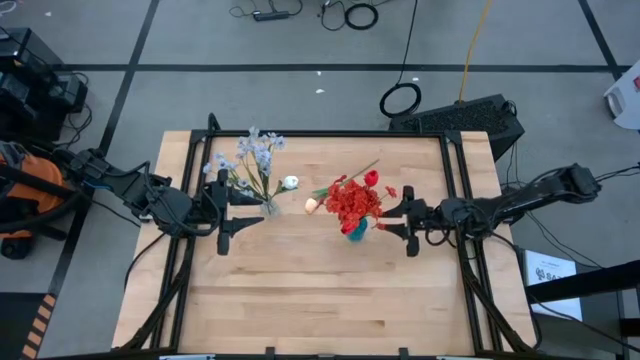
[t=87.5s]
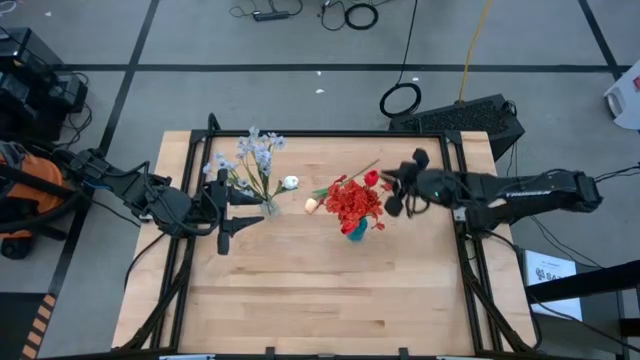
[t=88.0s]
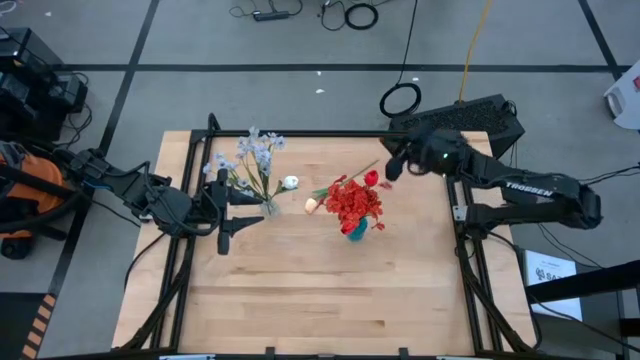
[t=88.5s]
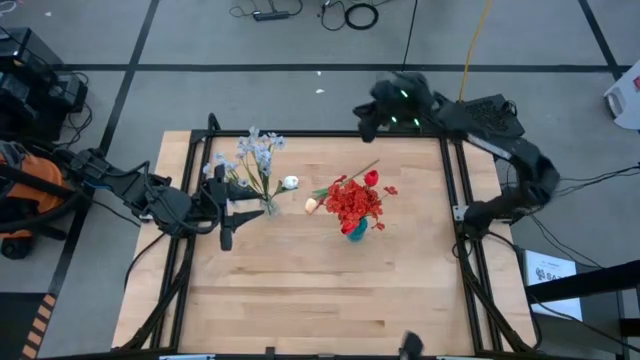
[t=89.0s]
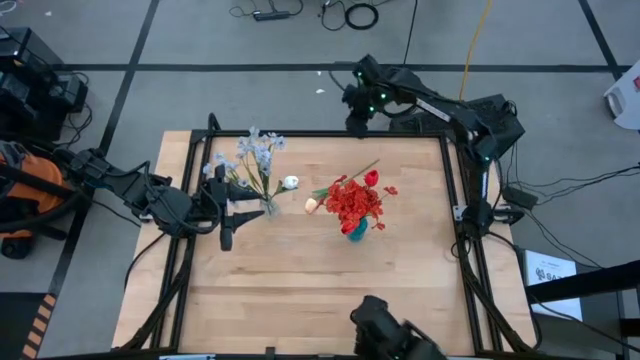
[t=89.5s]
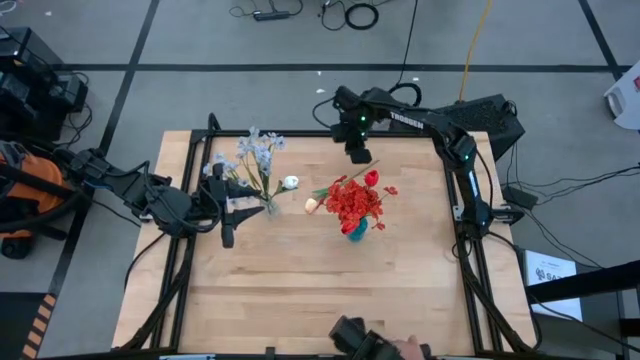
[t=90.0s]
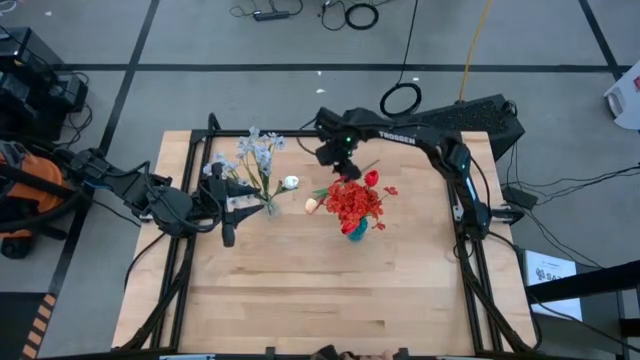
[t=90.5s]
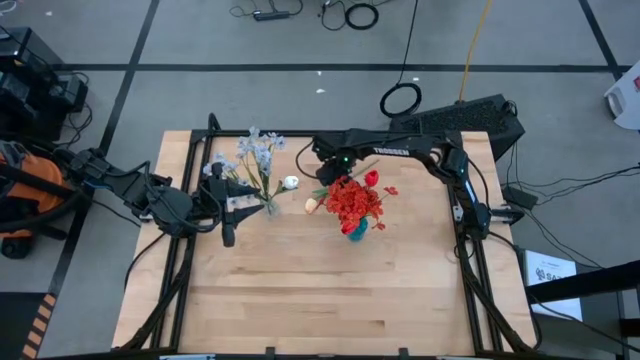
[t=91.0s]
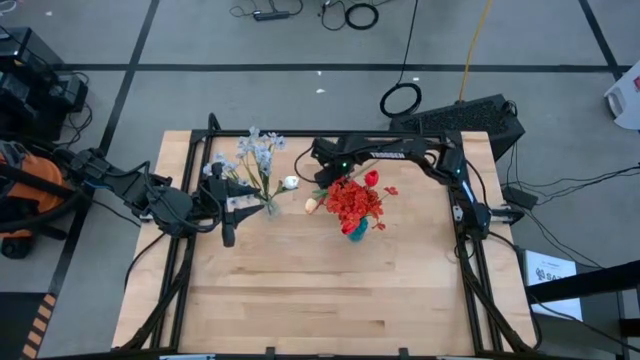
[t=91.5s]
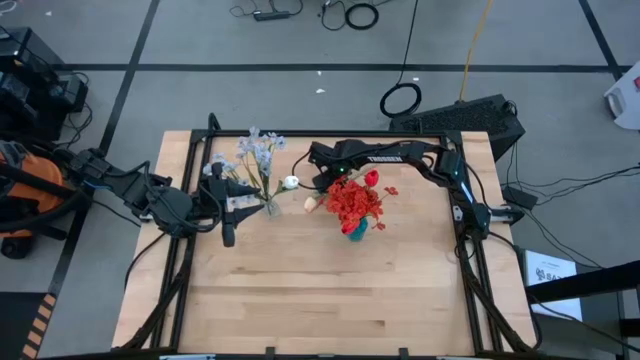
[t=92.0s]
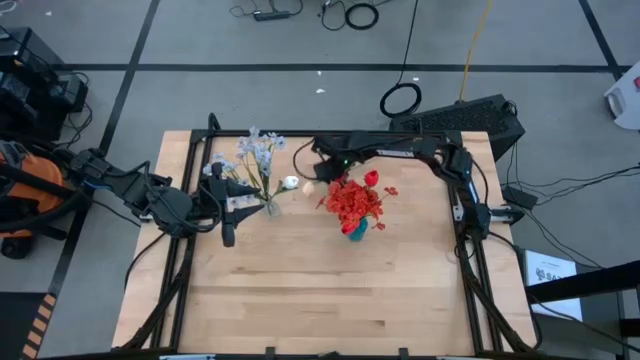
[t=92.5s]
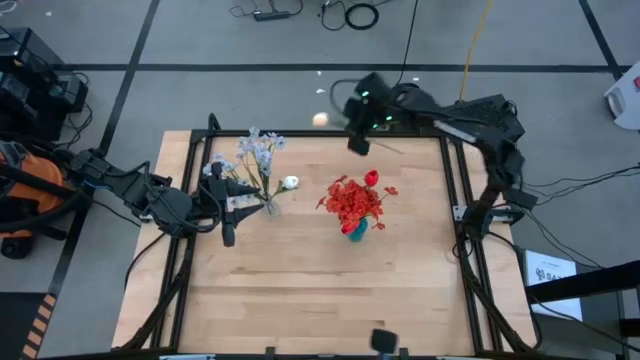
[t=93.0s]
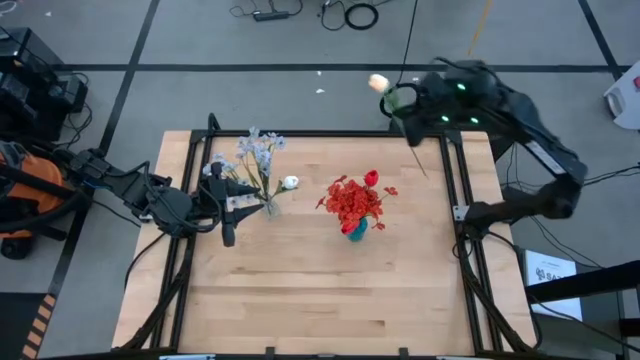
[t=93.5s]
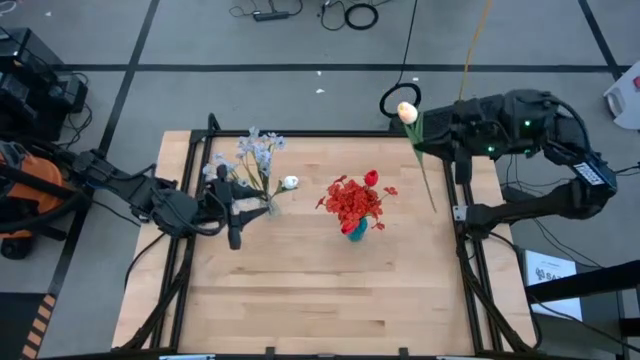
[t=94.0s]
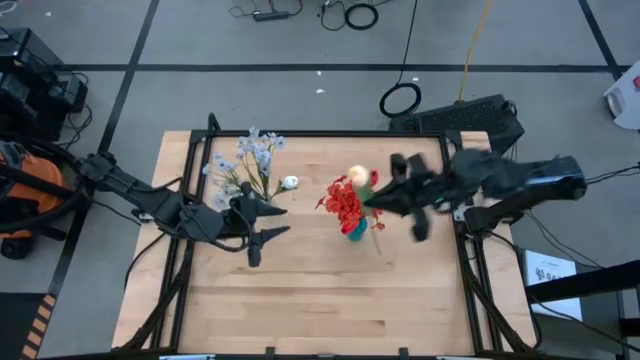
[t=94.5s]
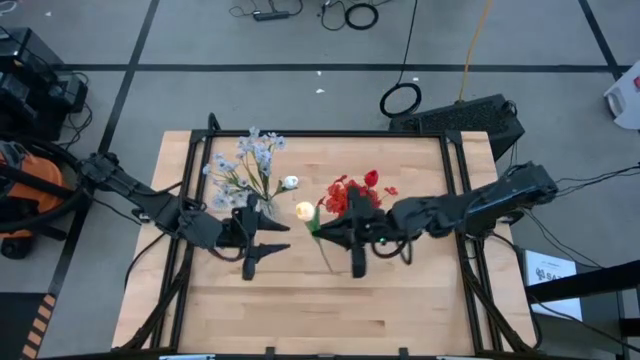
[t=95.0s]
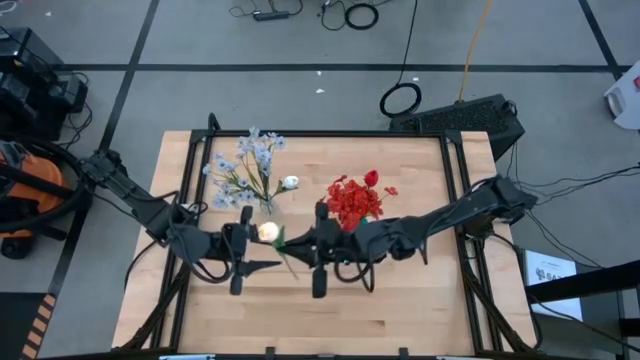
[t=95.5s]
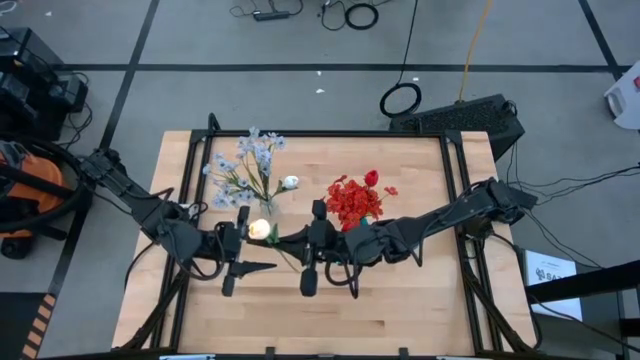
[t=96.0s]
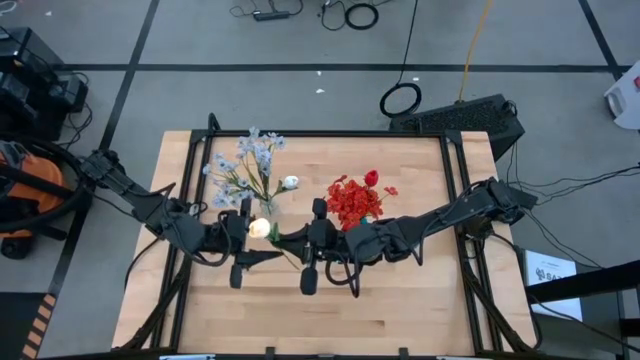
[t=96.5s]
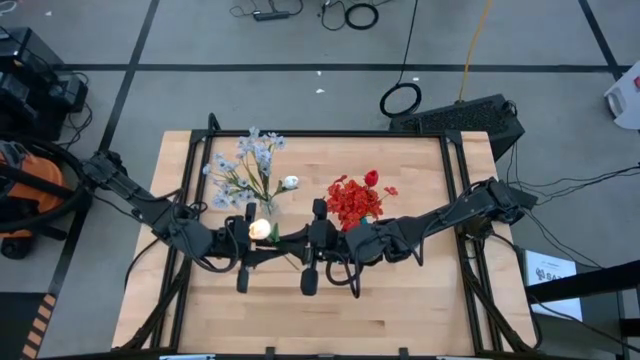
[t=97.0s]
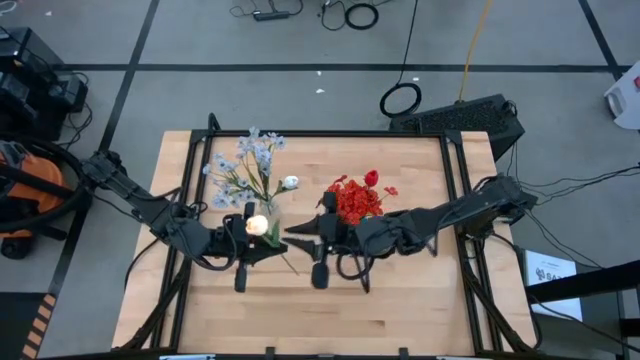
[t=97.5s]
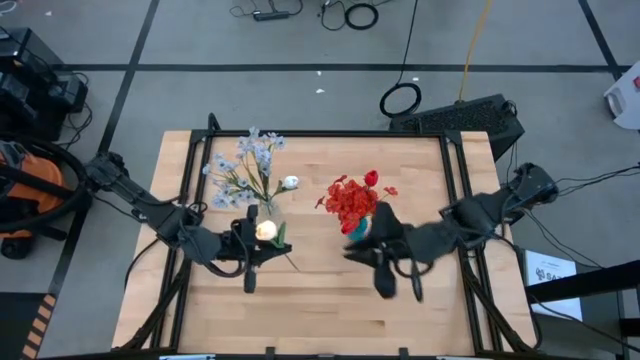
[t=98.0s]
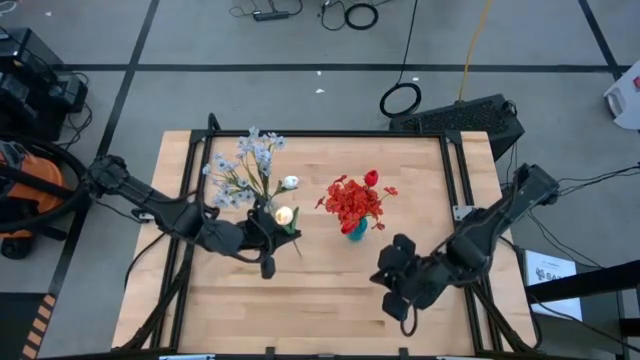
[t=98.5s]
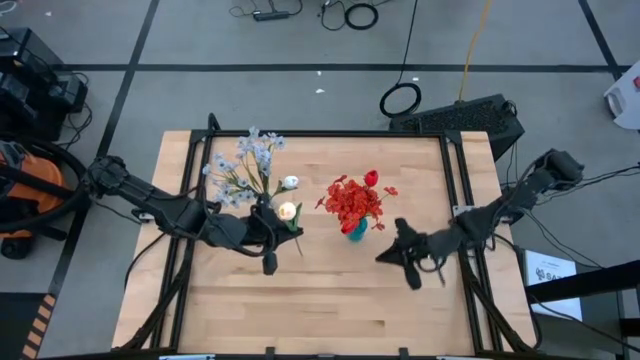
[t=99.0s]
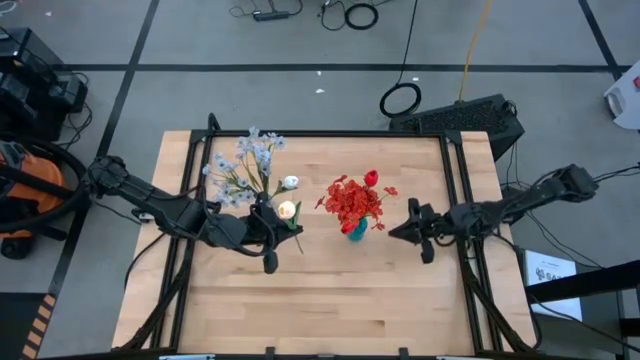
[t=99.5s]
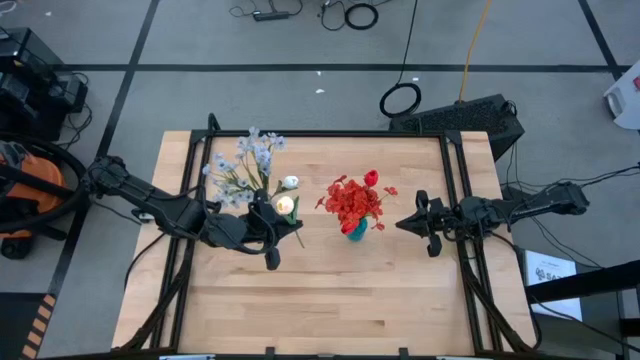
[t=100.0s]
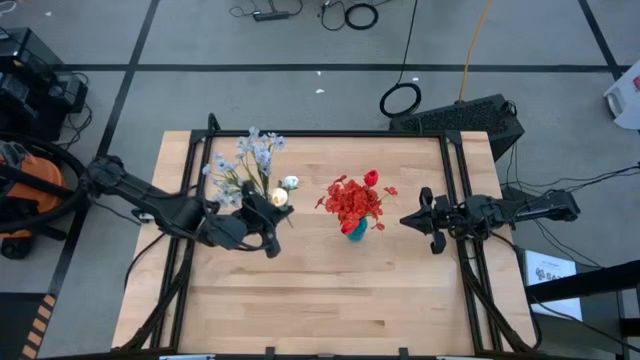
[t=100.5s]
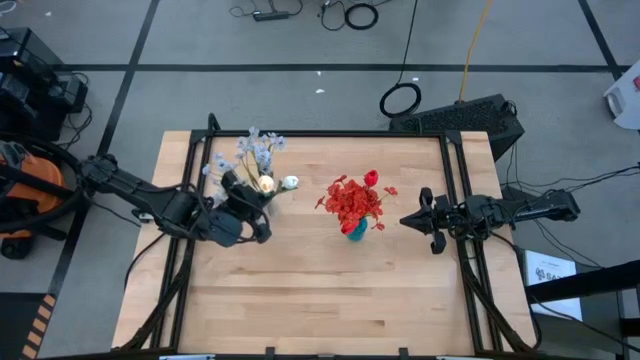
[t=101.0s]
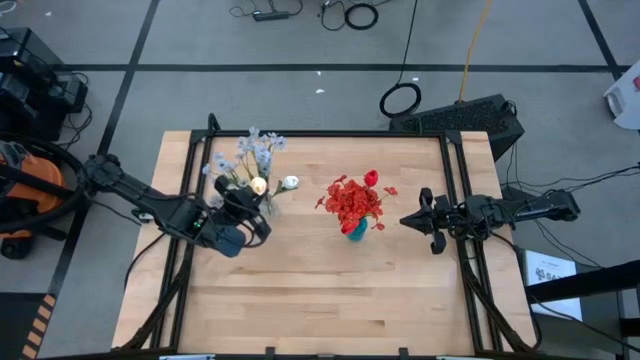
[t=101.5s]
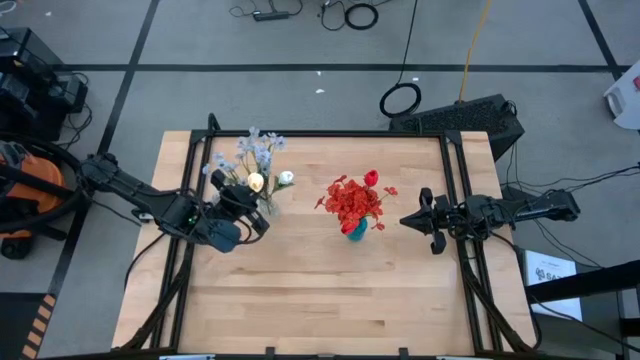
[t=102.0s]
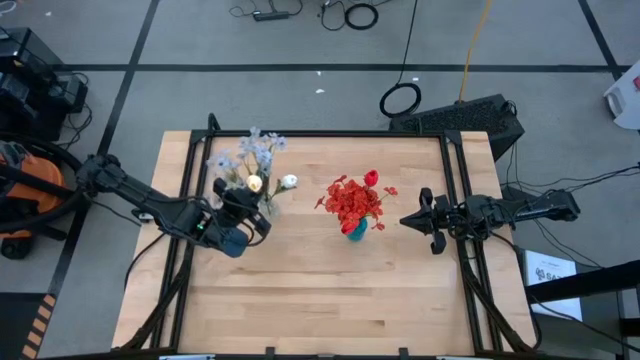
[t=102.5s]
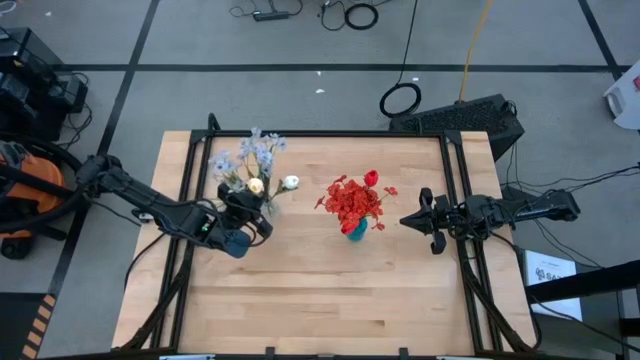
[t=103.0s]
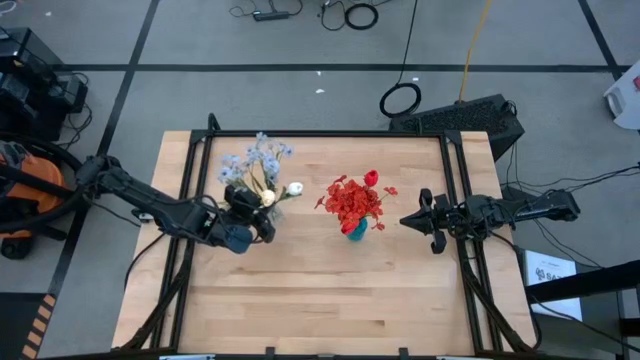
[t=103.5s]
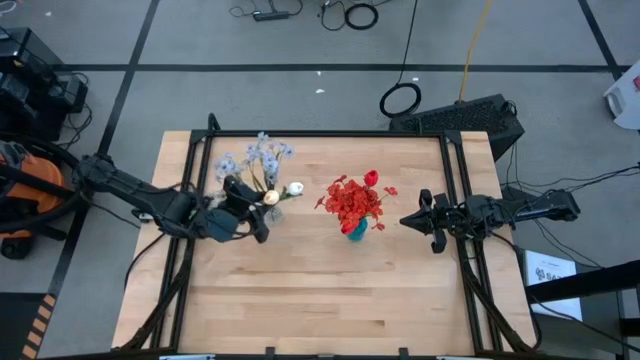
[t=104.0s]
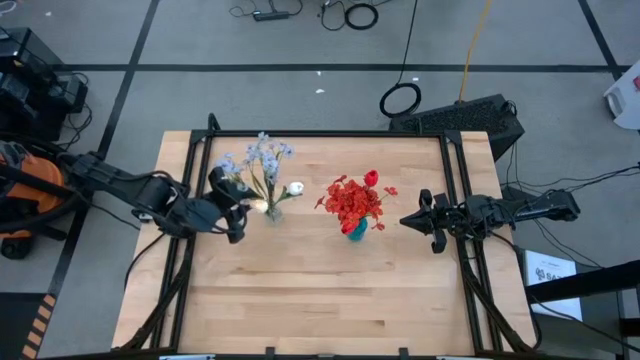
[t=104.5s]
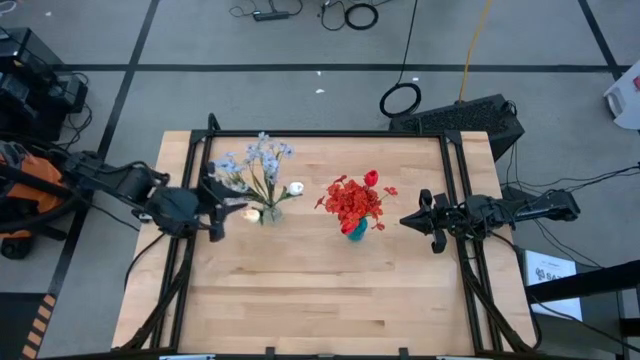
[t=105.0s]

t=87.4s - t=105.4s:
Task: Sort flowers into vase by color
Put the yellow tulip into the transparent vase

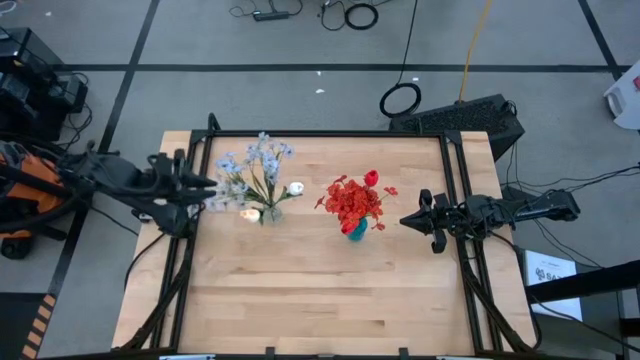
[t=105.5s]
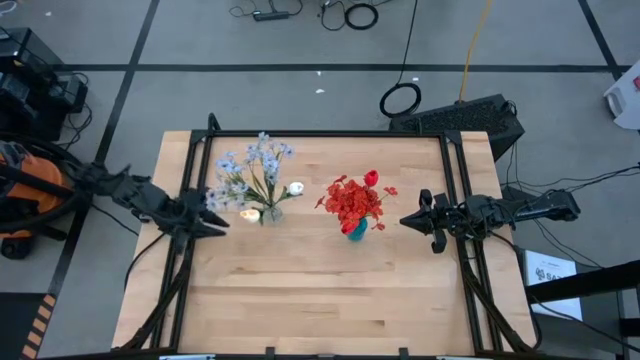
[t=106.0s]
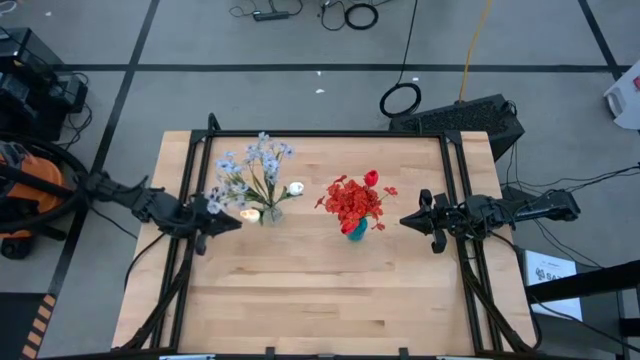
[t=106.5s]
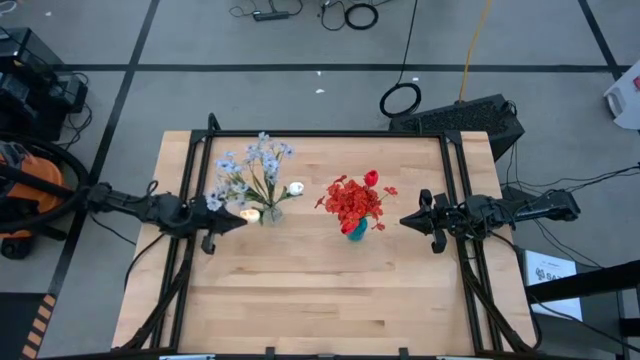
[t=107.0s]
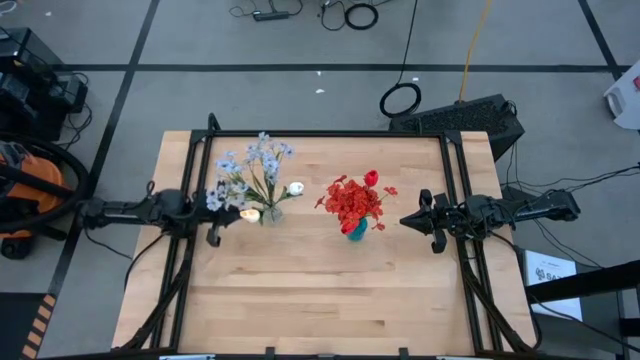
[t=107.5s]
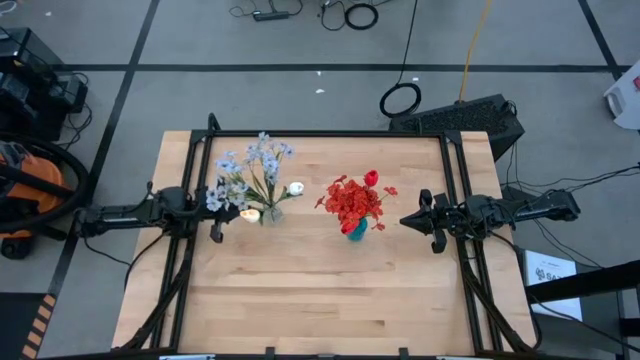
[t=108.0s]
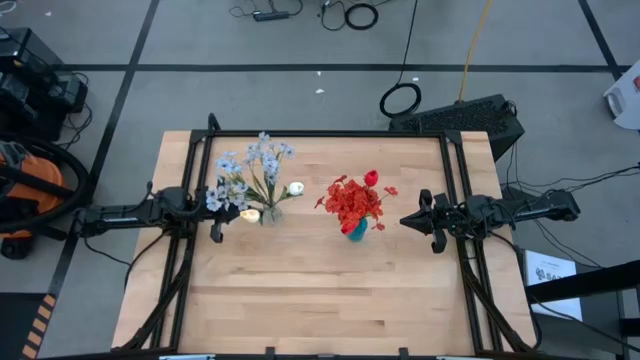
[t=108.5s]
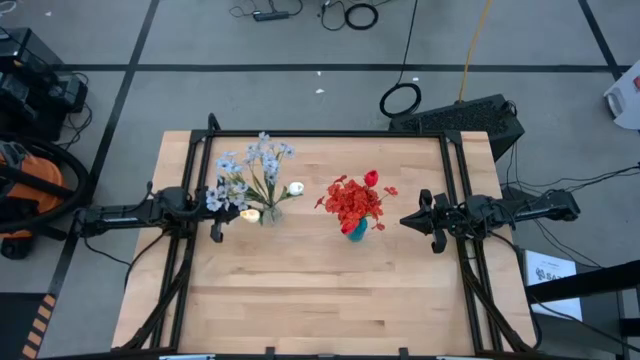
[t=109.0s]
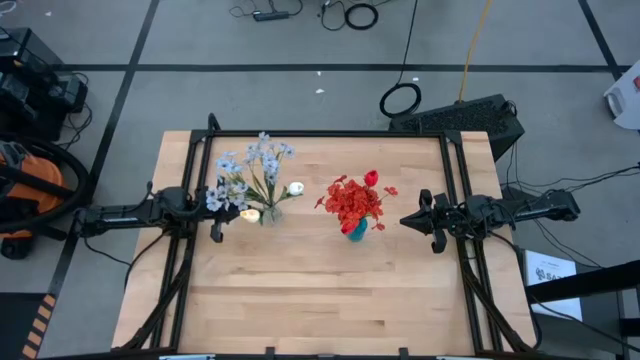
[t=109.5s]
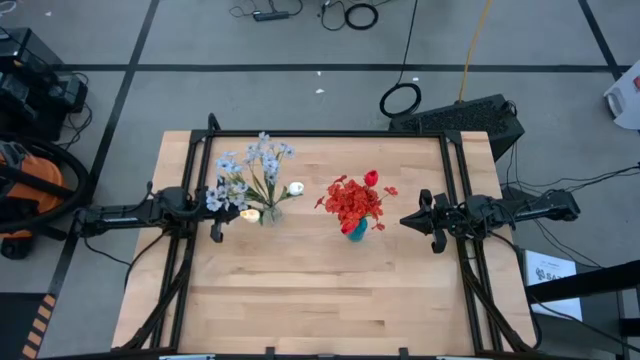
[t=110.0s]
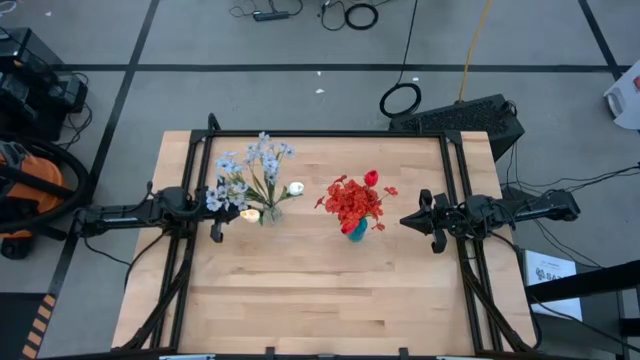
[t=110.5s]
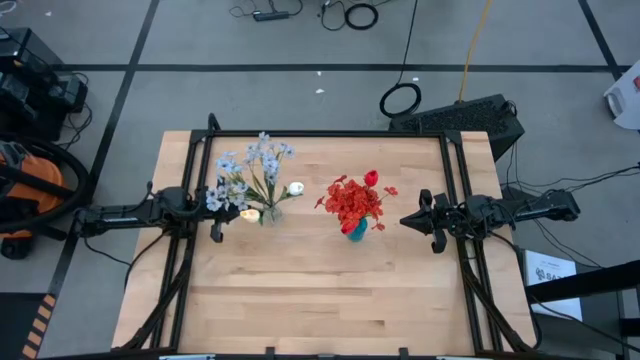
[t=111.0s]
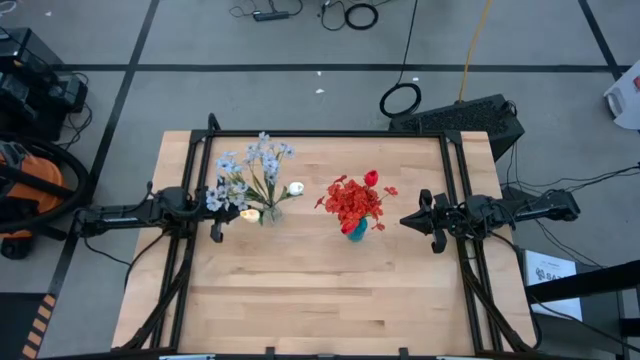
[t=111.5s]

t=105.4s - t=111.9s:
Return to Home Position
